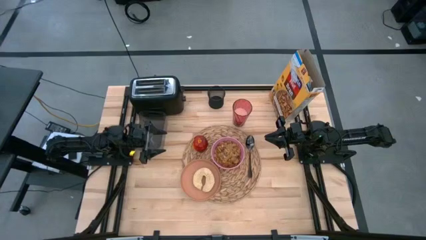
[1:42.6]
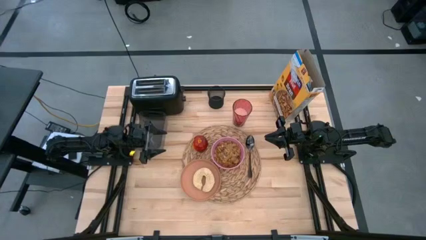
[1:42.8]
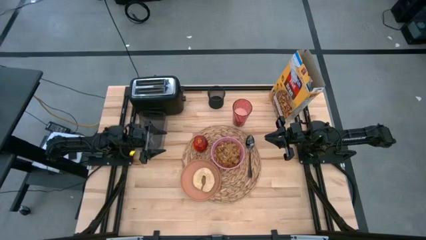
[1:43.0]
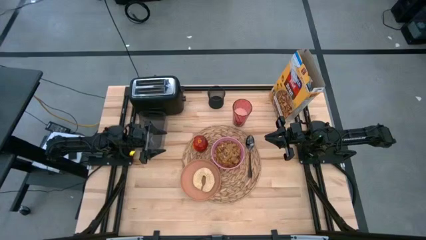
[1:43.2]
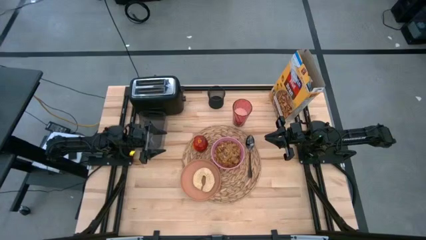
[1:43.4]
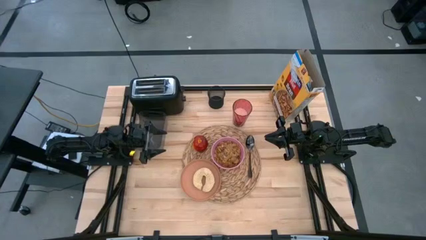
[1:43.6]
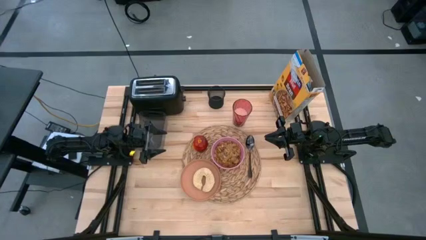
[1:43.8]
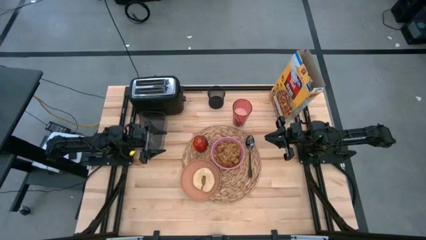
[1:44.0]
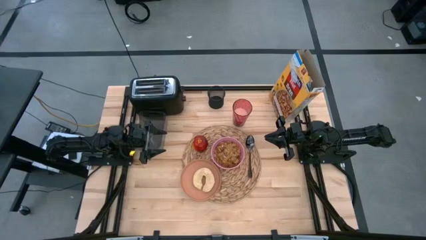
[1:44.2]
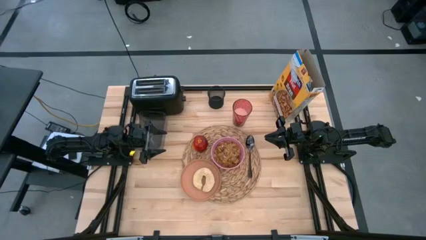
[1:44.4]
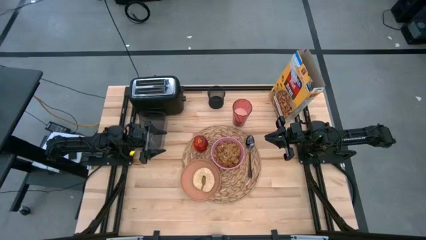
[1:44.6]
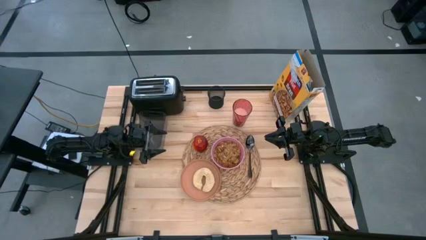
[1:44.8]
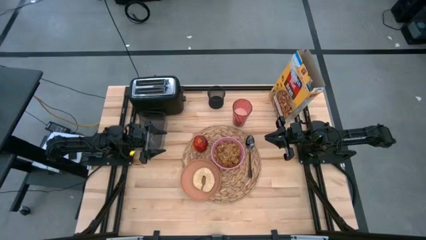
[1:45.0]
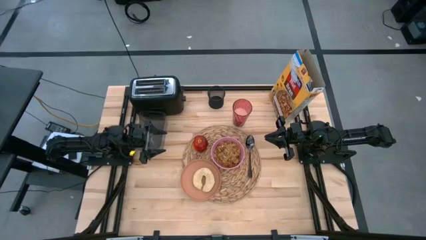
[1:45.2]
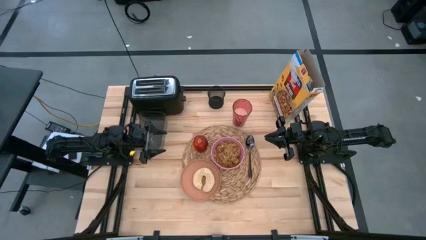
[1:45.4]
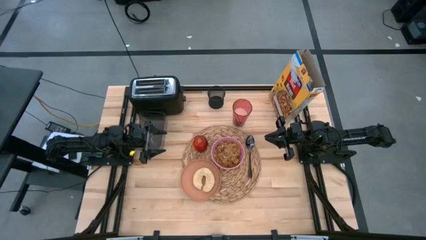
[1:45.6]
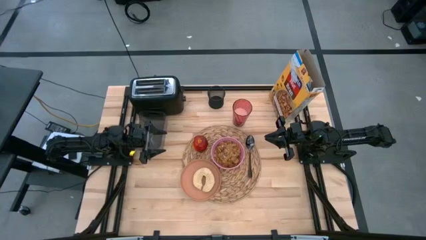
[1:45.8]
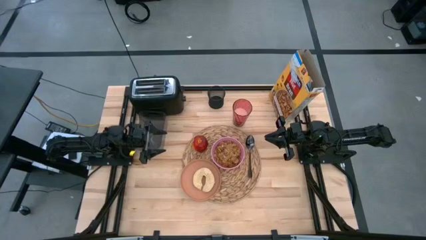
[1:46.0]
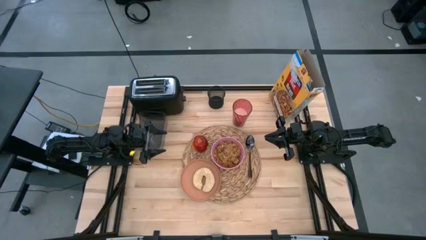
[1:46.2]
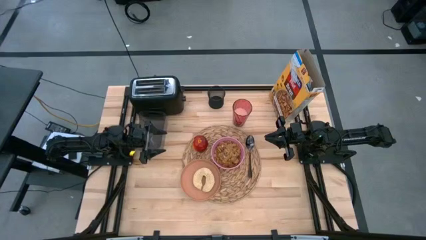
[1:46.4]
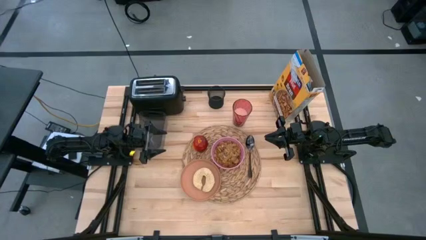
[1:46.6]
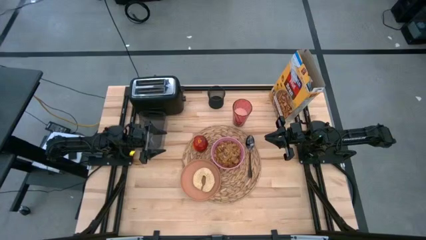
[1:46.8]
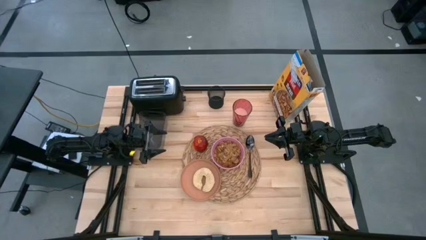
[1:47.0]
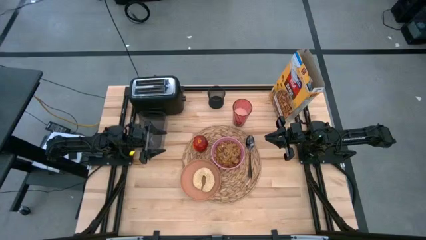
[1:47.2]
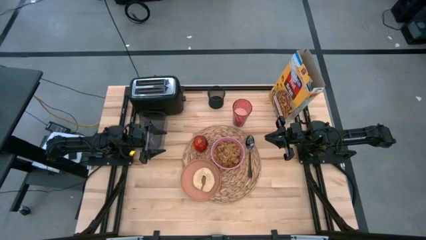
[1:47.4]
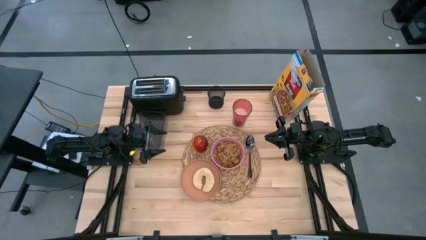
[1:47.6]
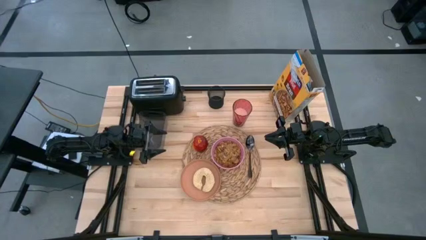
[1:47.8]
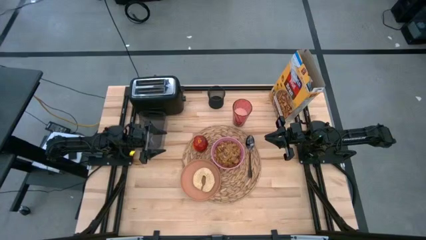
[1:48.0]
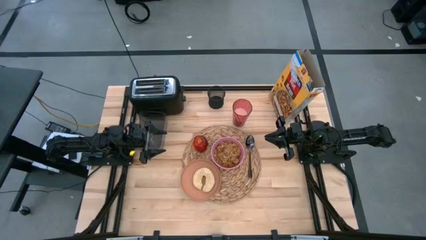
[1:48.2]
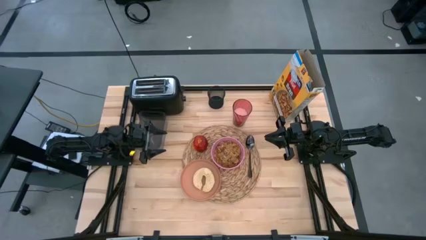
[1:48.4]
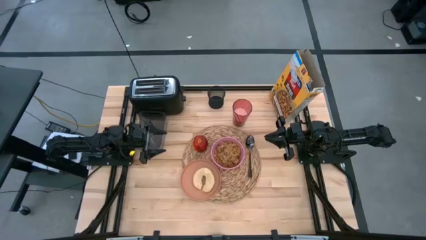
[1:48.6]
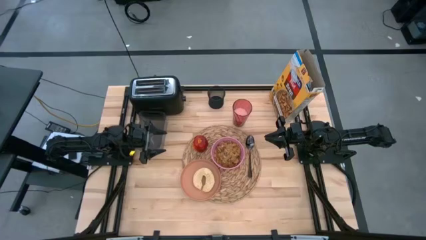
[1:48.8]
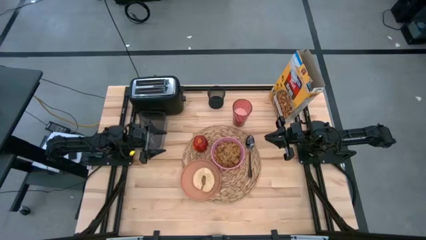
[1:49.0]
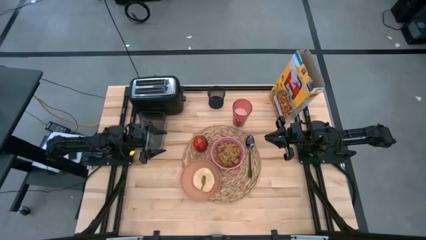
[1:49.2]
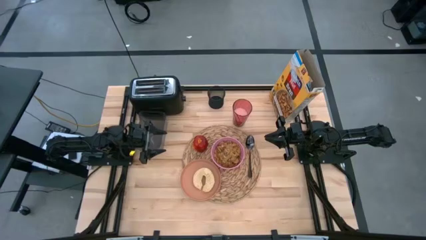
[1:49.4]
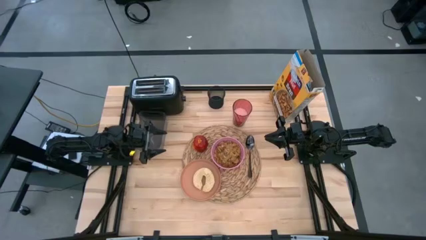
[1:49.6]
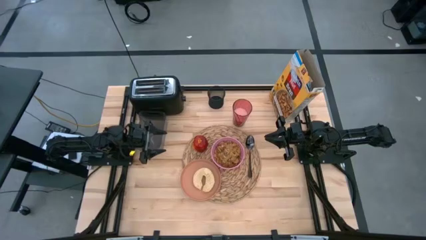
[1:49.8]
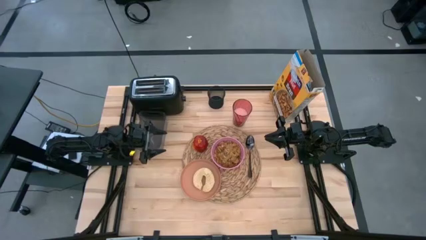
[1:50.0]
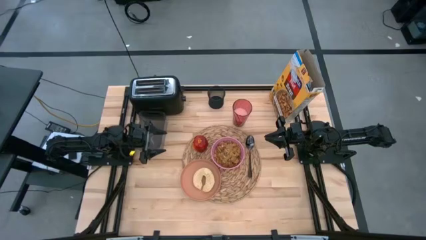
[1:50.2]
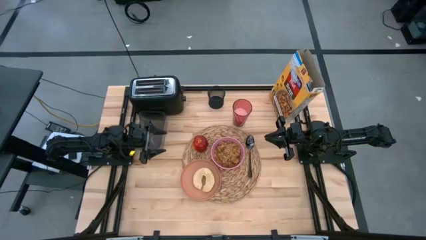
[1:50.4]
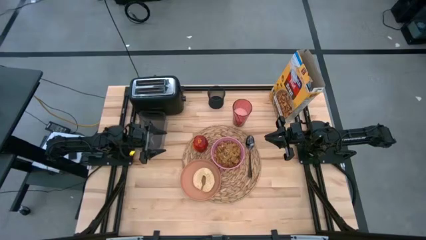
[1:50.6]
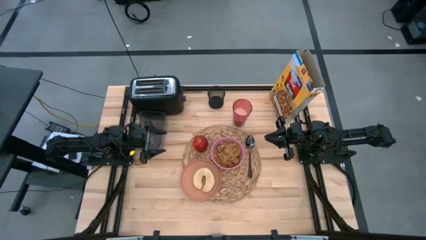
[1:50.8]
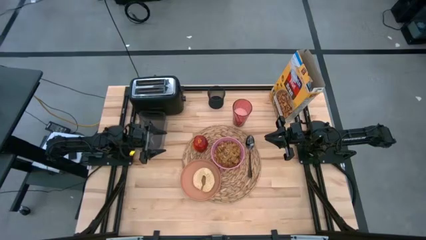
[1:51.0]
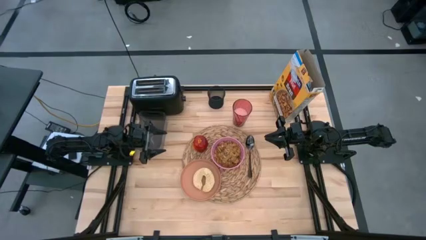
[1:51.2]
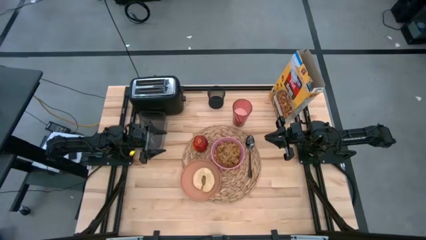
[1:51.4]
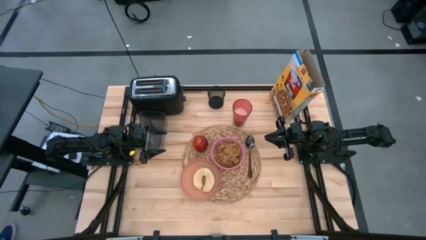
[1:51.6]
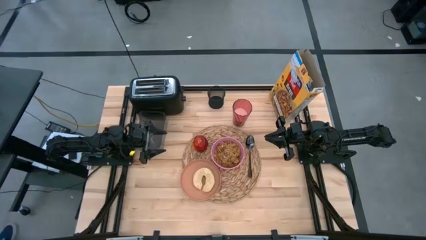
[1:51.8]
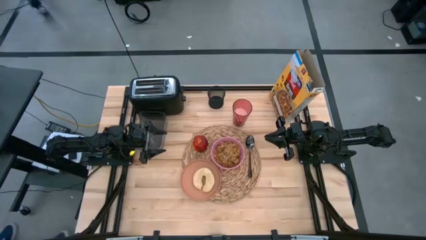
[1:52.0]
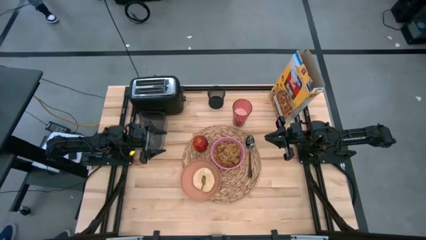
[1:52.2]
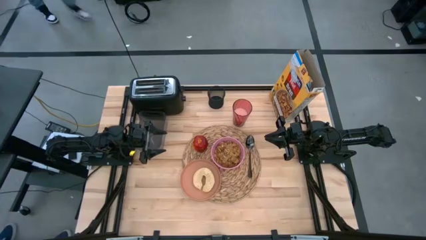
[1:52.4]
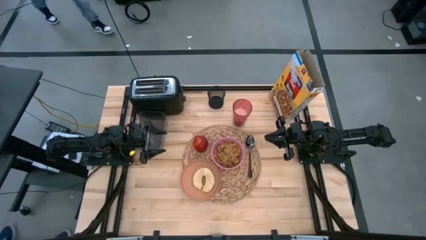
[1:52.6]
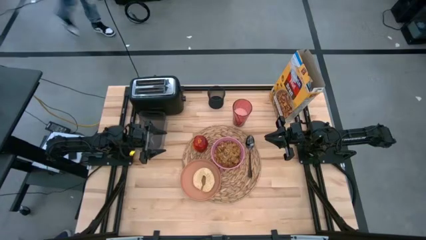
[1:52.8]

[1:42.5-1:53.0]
Task: Arrange a breakfast setting
Return to Home Position

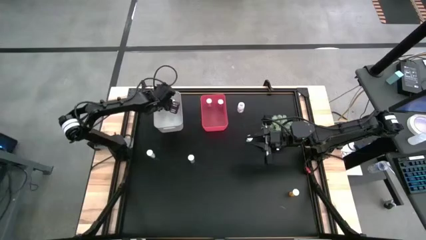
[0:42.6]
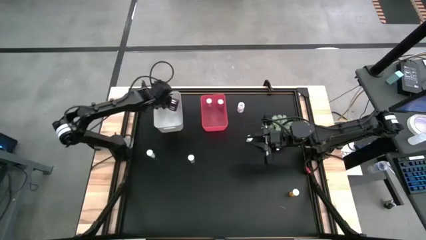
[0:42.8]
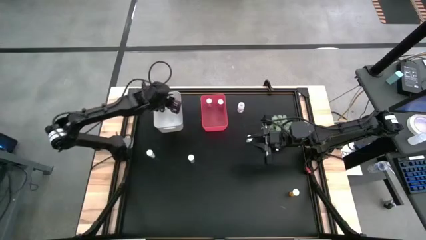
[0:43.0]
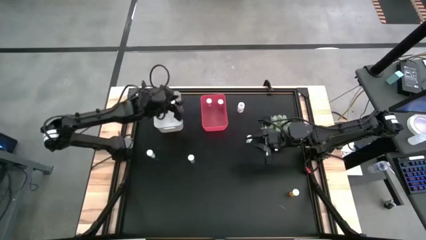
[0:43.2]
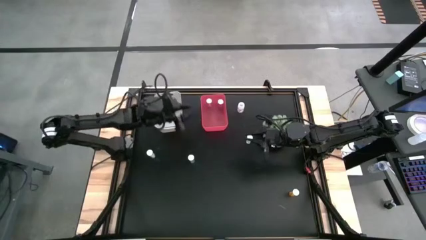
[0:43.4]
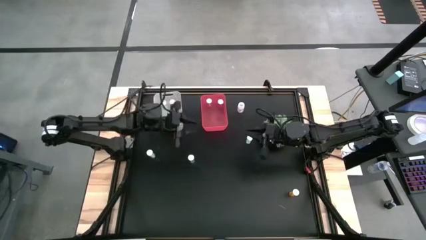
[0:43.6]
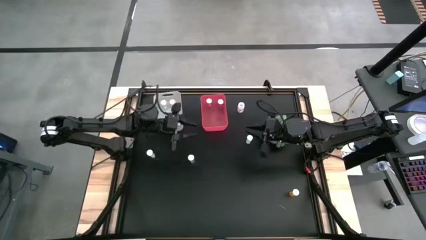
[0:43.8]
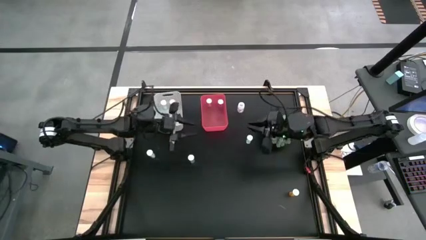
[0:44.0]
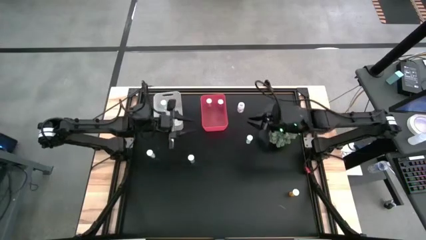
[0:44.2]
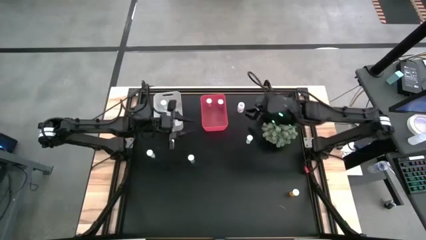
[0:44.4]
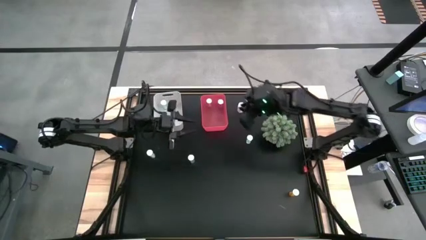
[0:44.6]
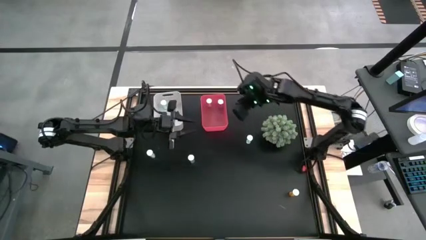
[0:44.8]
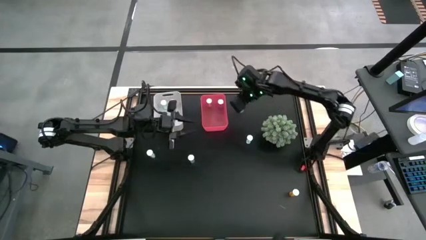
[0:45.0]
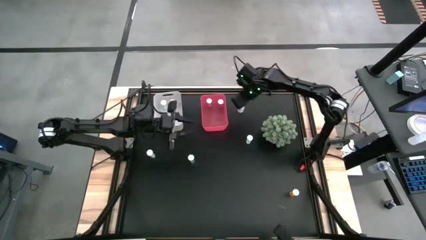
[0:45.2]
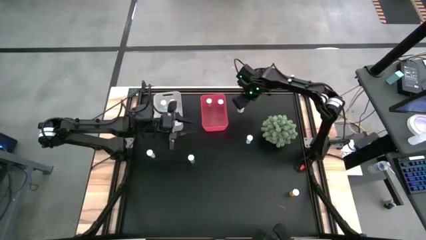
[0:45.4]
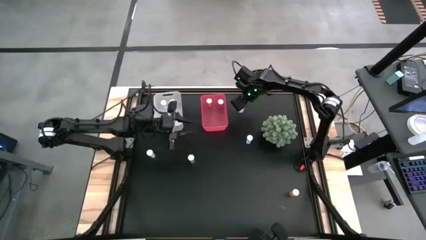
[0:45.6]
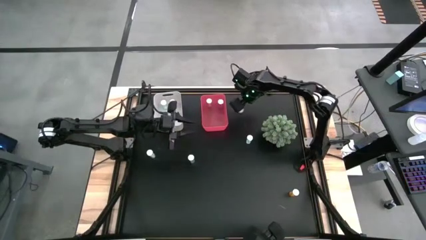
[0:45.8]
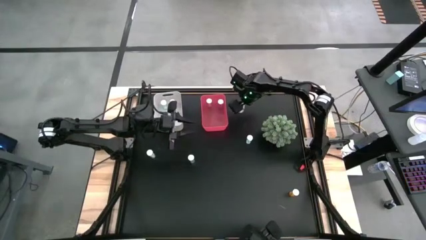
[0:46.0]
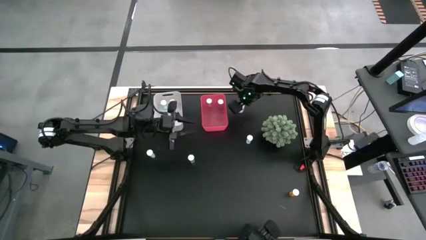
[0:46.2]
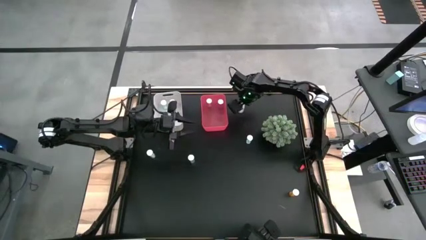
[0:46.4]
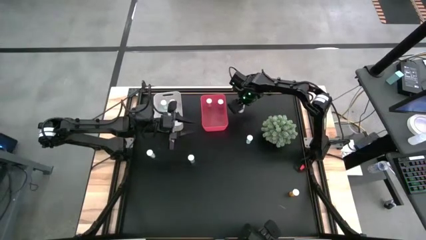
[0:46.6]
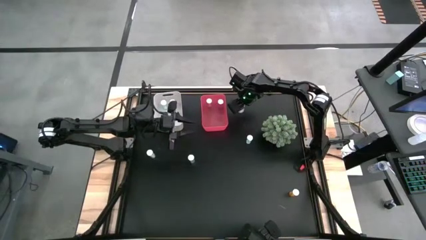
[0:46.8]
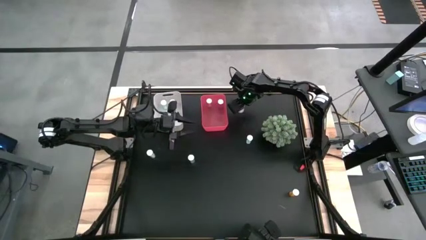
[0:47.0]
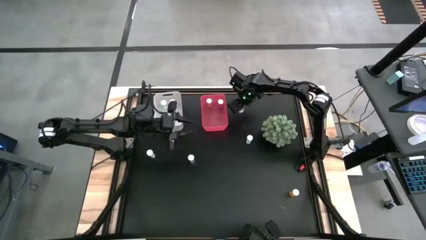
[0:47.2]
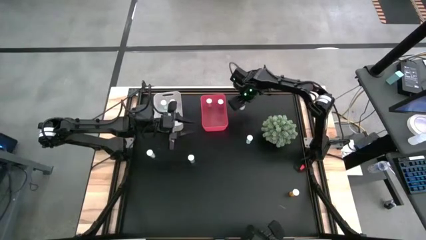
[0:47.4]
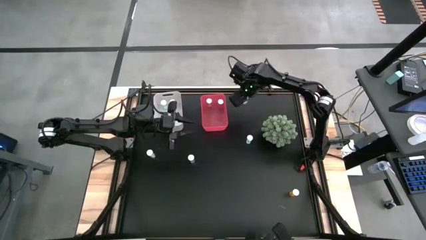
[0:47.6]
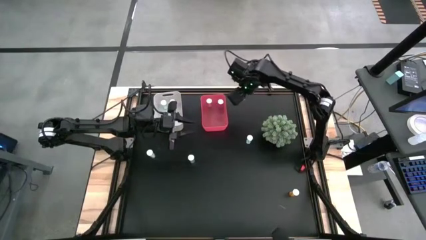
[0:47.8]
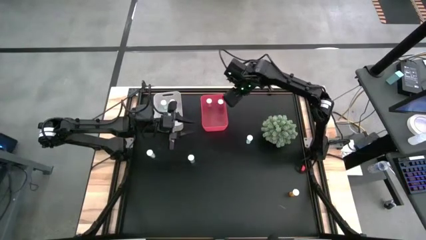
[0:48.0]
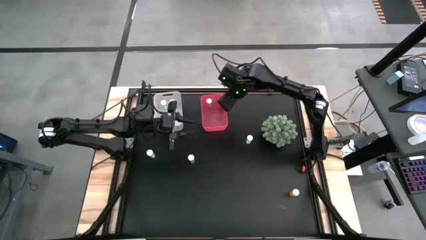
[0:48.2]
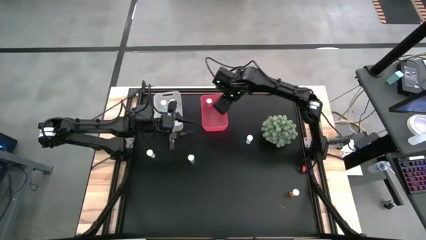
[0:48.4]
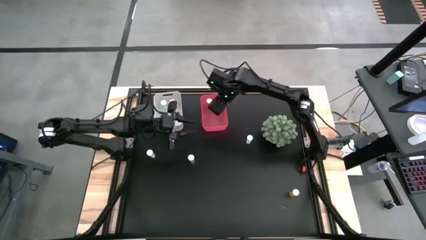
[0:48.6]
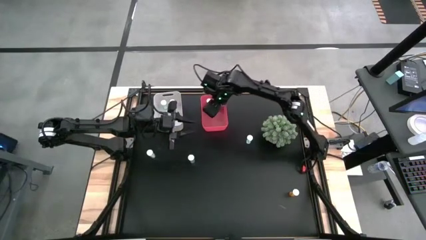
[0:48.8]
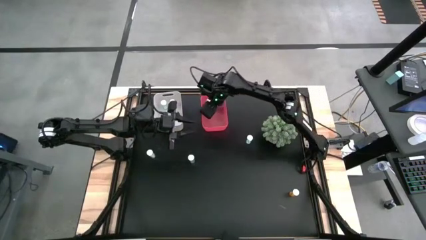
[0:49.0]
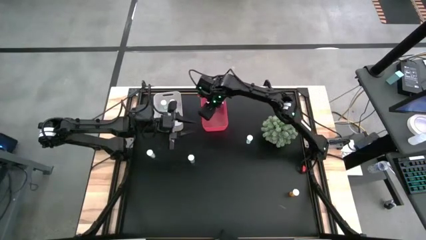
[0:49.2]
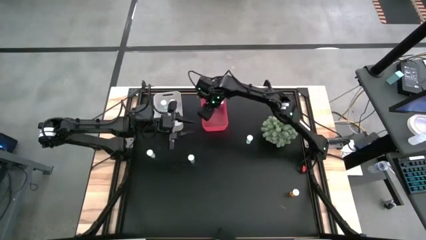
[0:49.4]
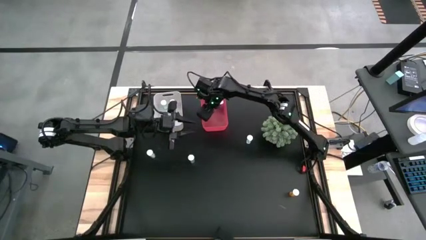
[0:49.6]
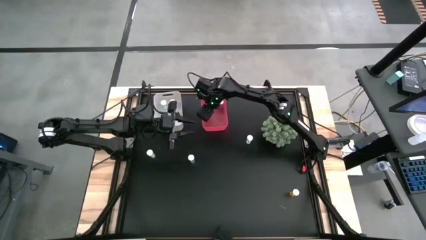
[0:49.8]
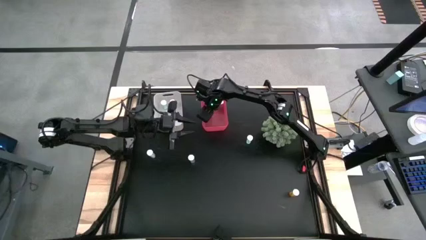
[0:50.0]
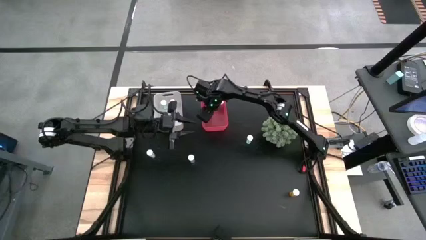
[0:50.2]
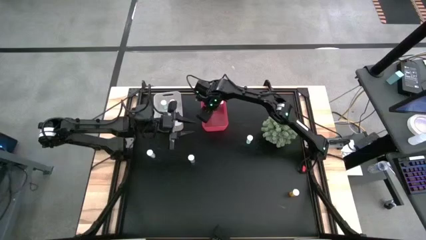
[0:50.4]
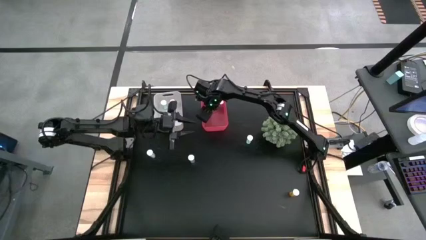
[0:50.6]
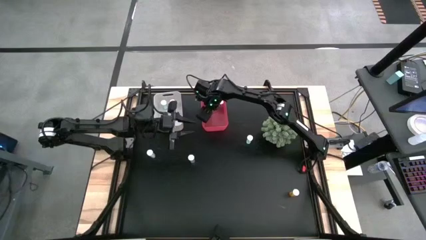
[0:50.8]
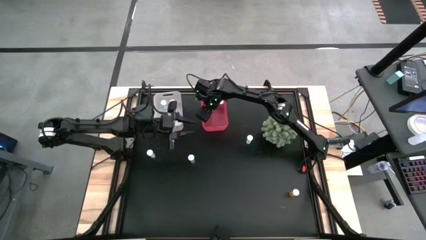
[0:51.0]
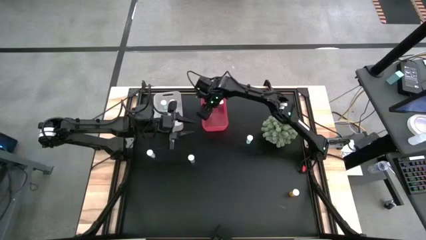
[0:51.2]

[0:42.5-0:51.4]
Task: Pick and place medicine bottles into bin by pill shape (circle, oval)
Put the transparent capsule bottle into the pink bin
